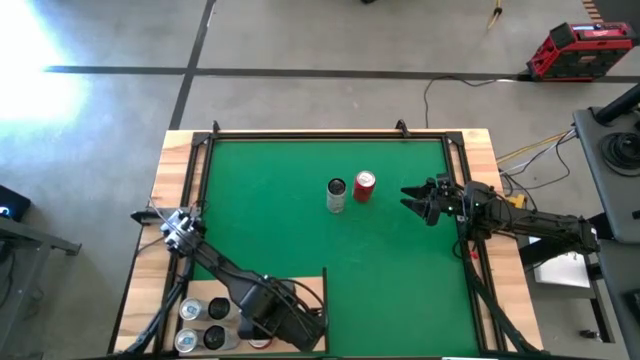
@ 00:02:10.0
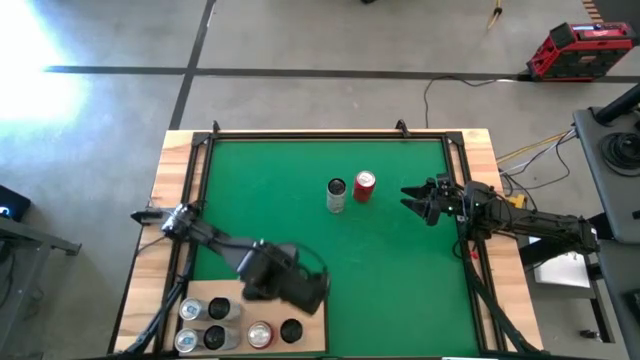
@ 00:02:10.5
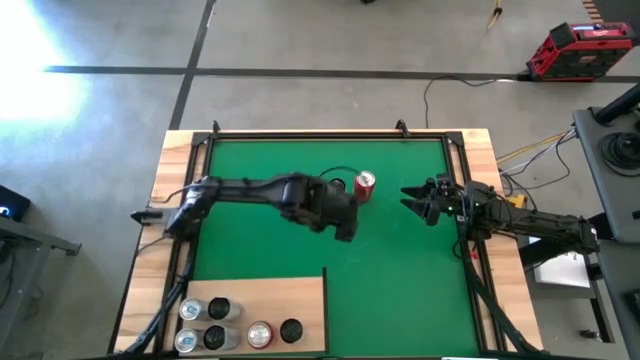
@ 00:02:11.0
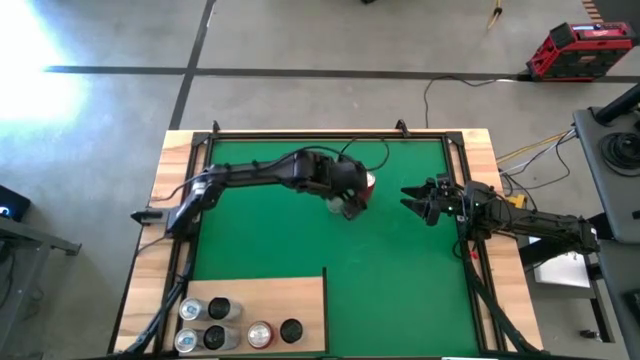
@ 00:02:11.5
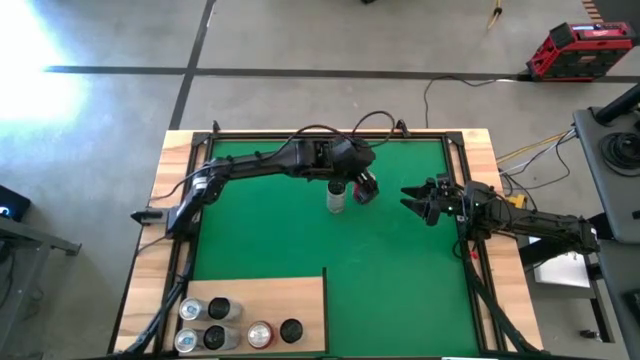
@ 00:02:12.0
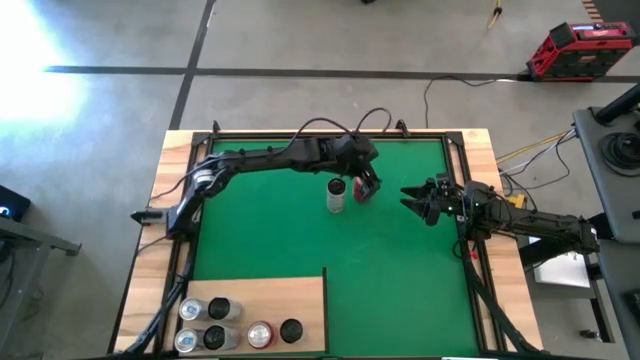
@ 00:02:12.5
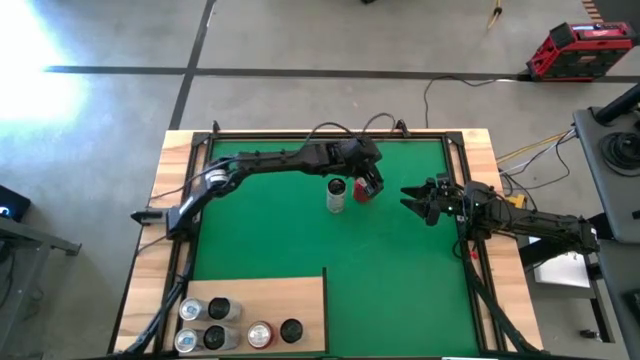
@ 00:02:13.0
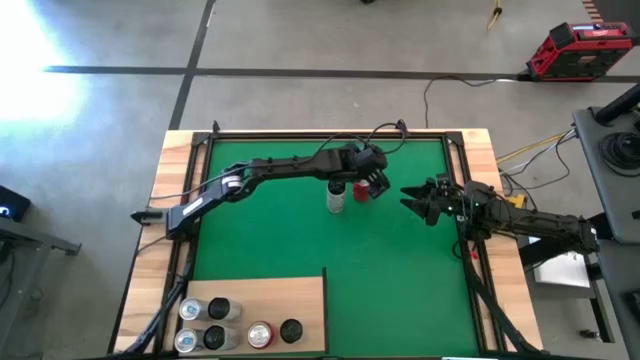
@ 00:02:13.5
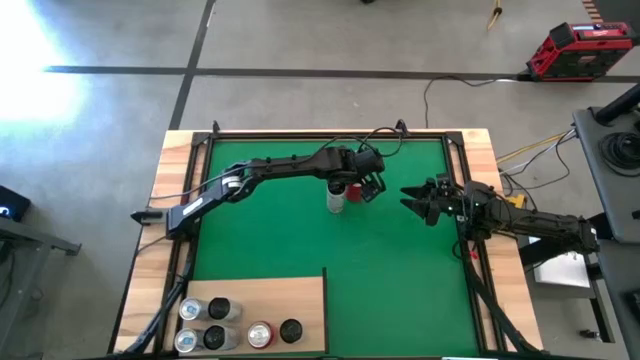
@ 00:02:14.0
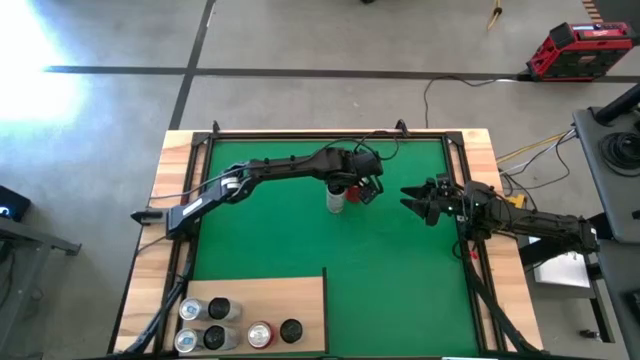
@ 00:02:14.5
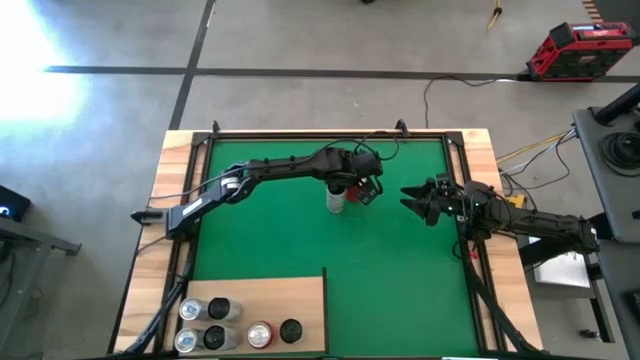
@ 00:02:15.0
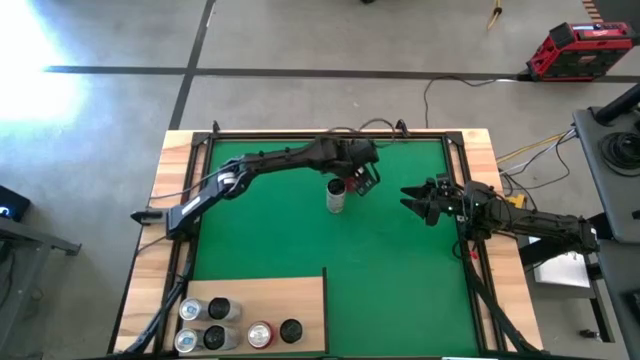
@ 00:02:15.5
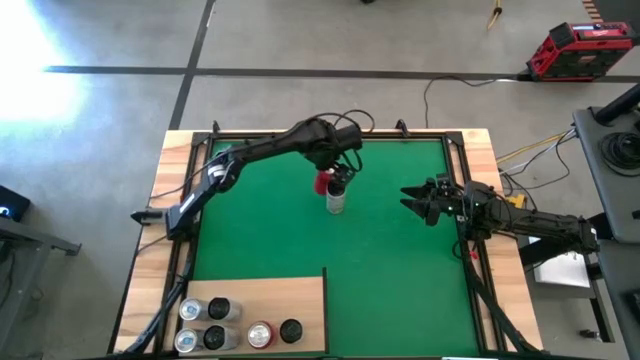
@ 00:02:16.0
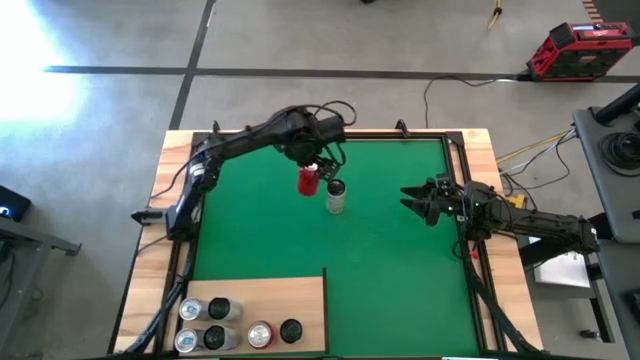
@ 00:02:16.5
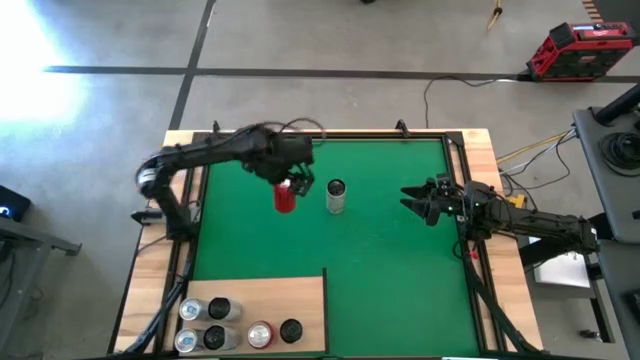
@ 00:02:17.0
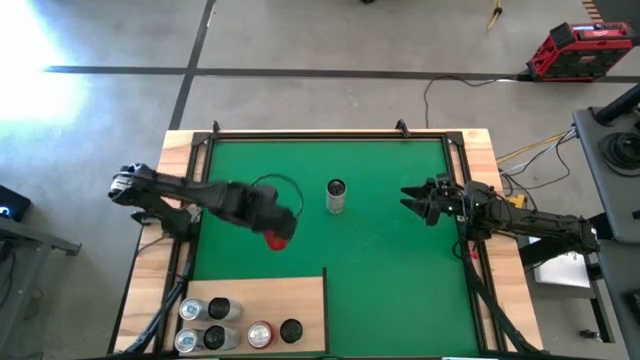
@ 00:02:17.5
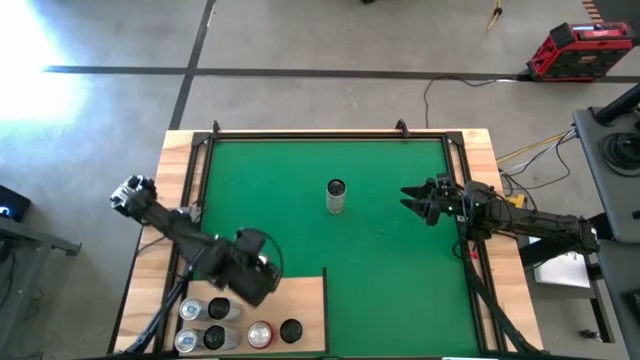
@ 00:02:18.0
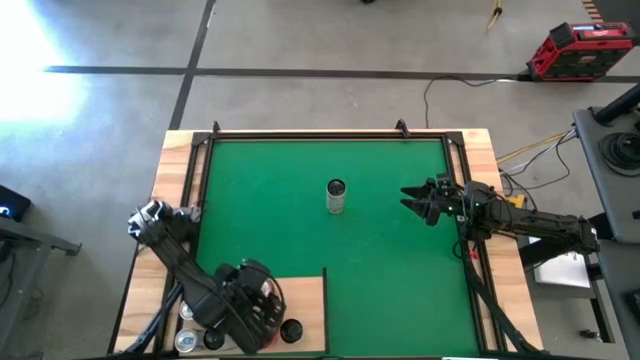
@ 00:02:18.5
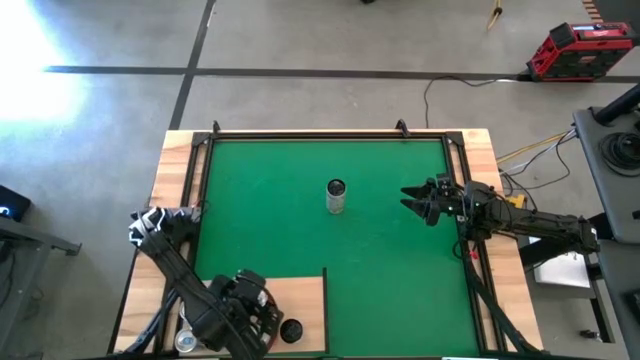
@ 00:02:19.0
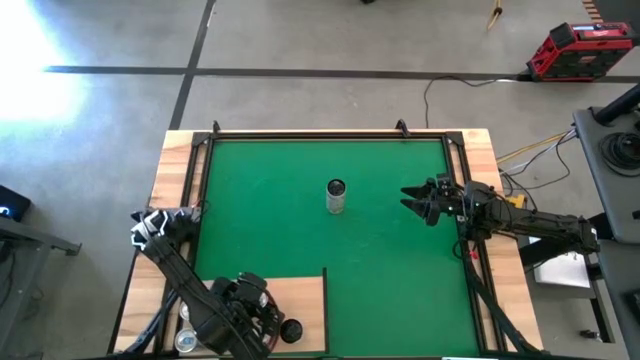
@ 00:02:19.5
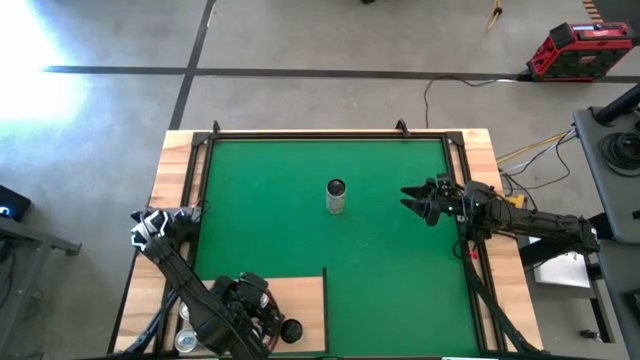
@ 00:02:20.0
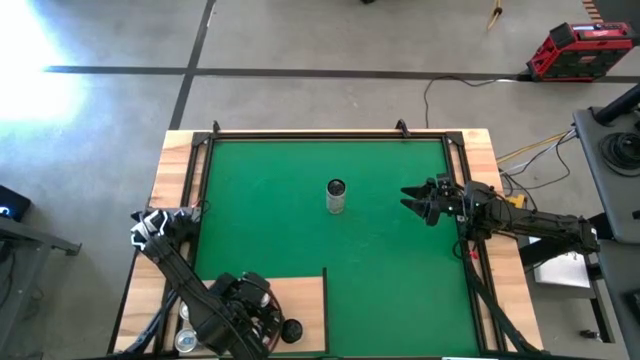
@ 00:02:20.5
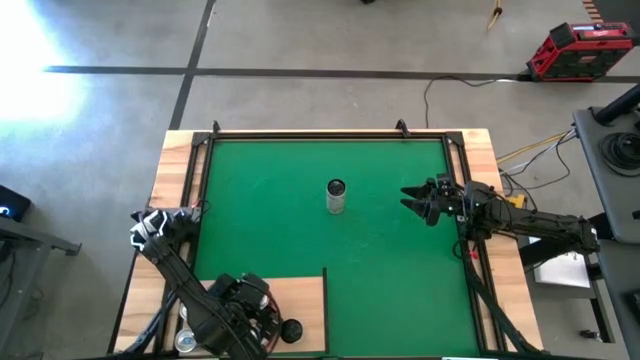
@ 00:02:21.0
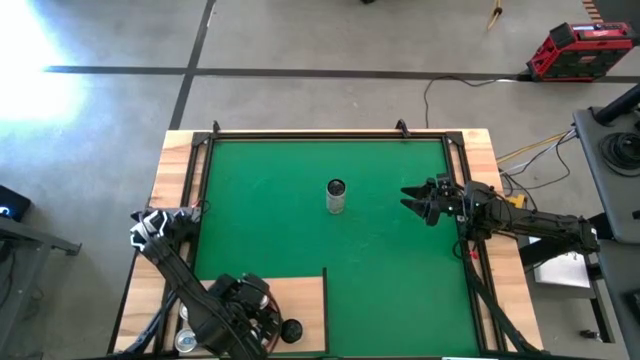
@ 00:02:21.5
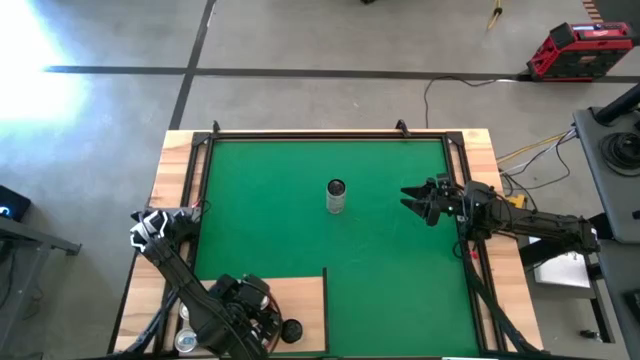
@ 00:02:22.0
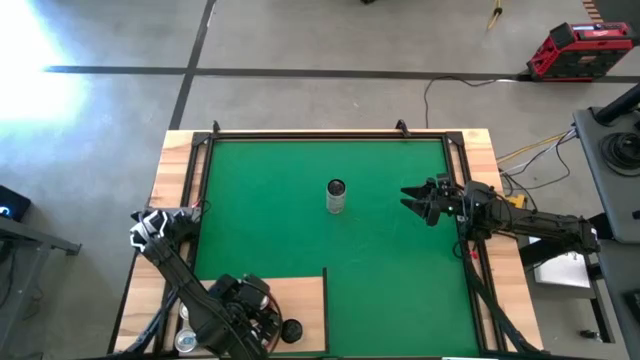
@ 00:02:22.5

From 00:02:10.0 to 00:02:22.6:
Task: Place canned beverage on shelf
Put the red soda can on the shelf align with other the red soda can

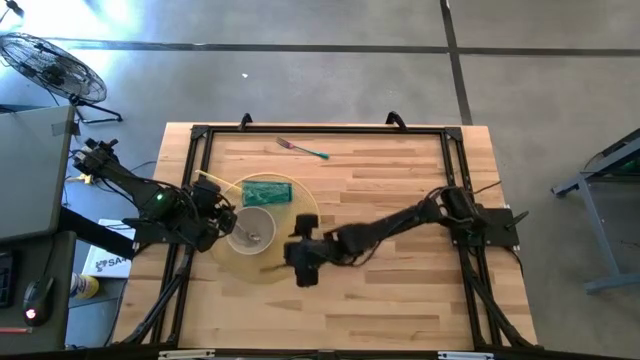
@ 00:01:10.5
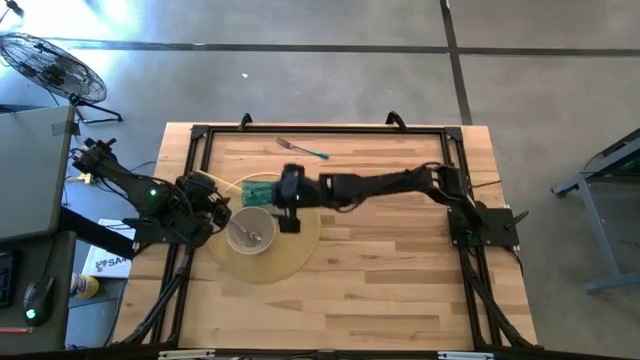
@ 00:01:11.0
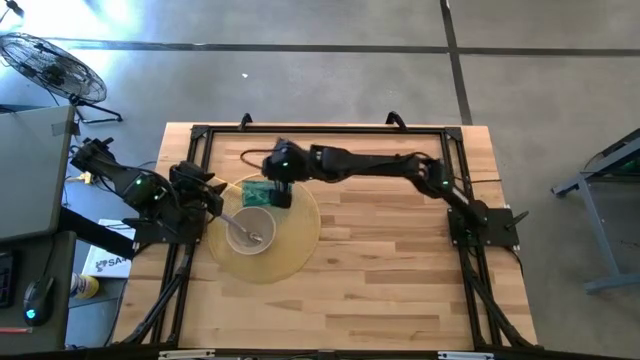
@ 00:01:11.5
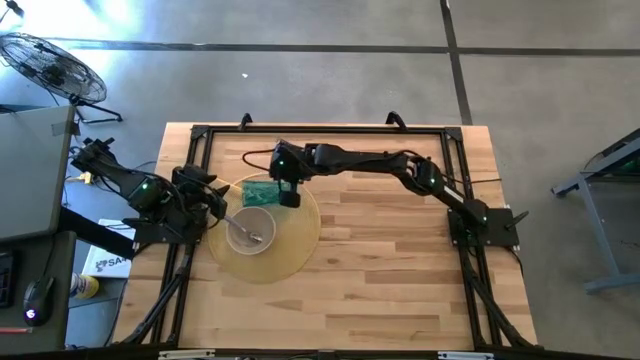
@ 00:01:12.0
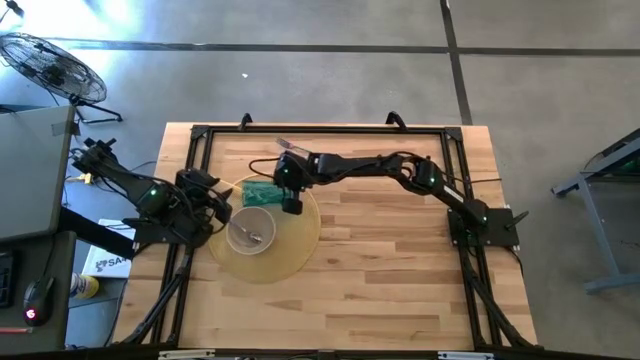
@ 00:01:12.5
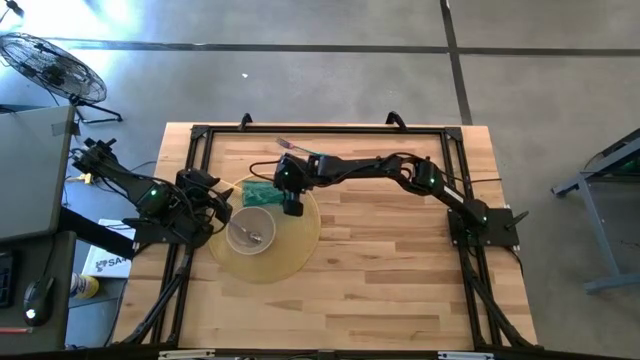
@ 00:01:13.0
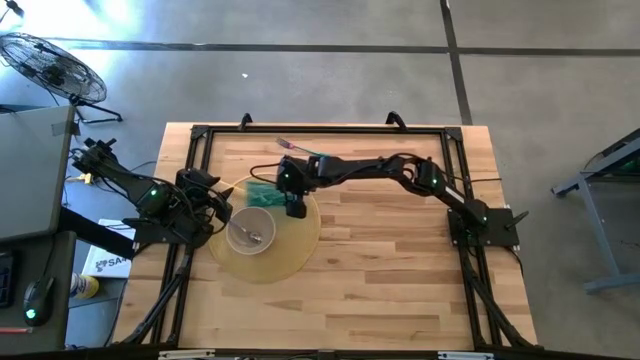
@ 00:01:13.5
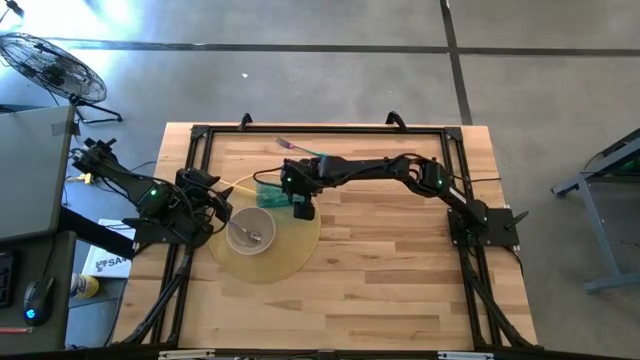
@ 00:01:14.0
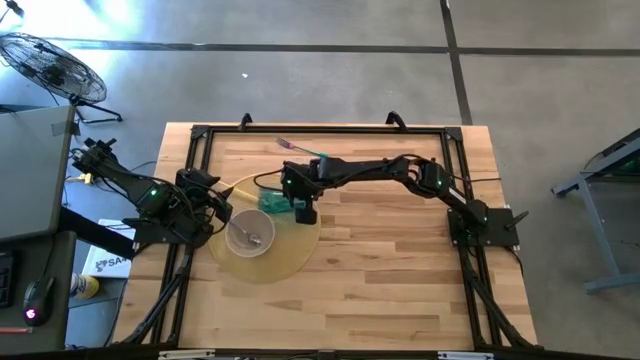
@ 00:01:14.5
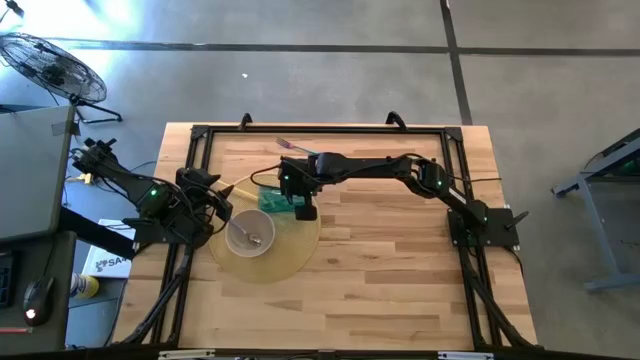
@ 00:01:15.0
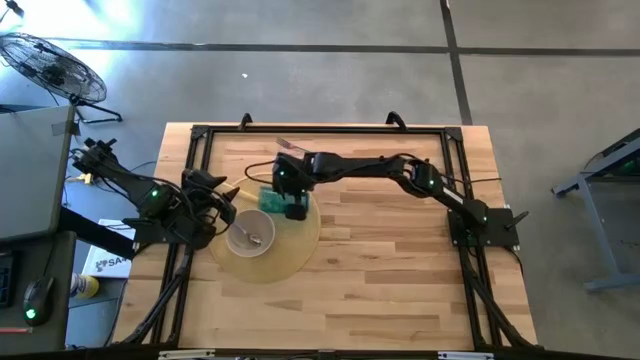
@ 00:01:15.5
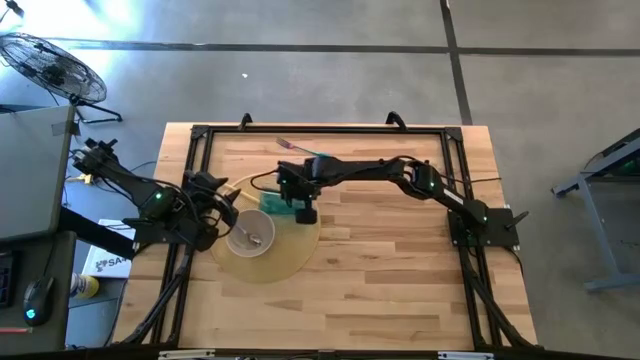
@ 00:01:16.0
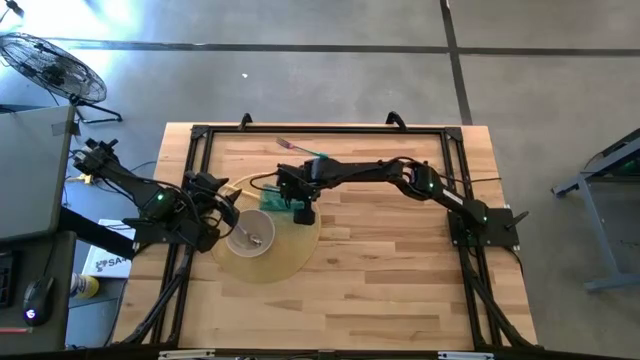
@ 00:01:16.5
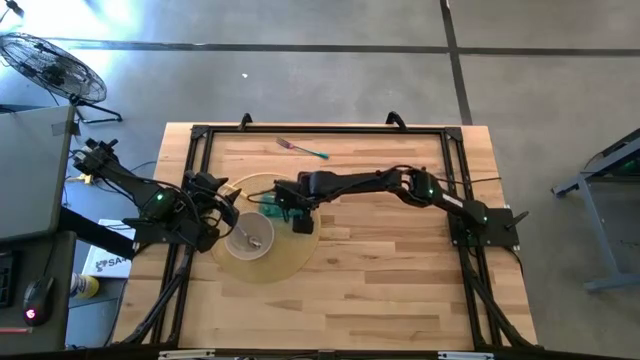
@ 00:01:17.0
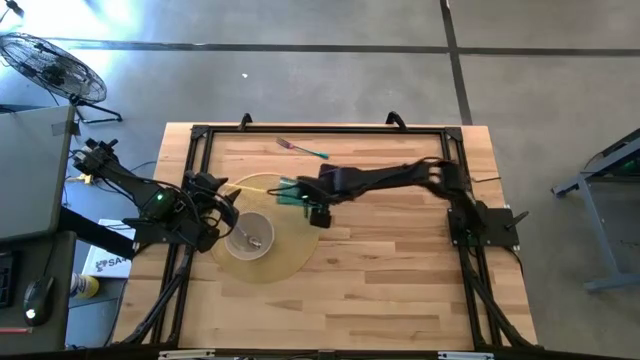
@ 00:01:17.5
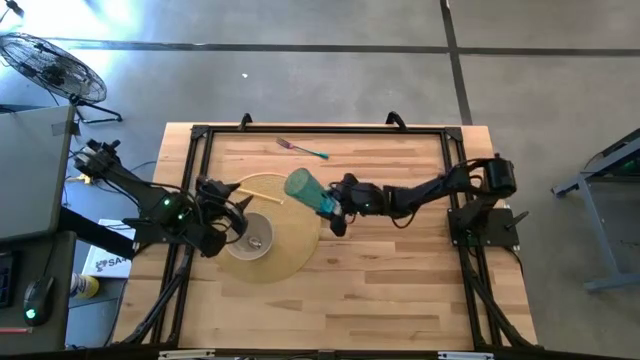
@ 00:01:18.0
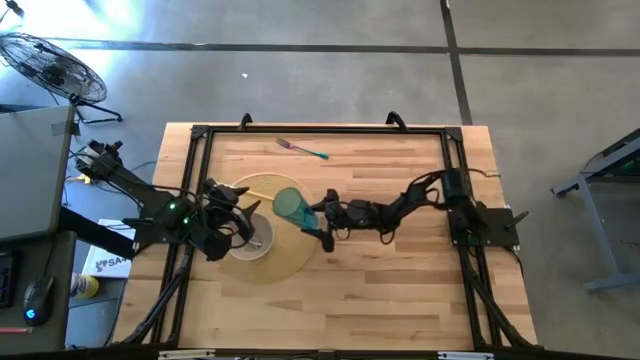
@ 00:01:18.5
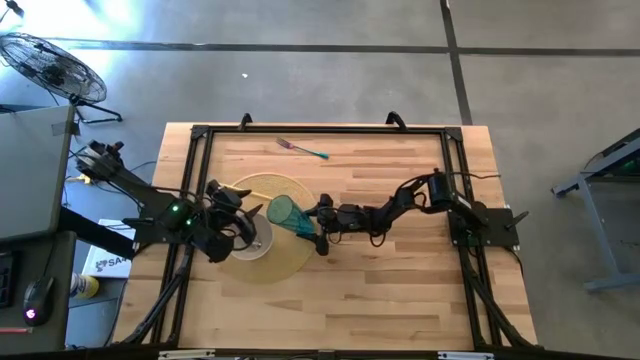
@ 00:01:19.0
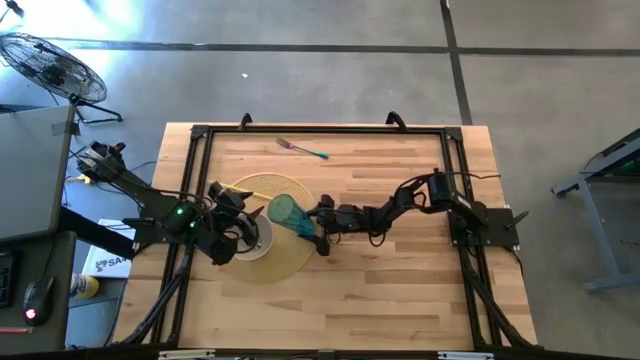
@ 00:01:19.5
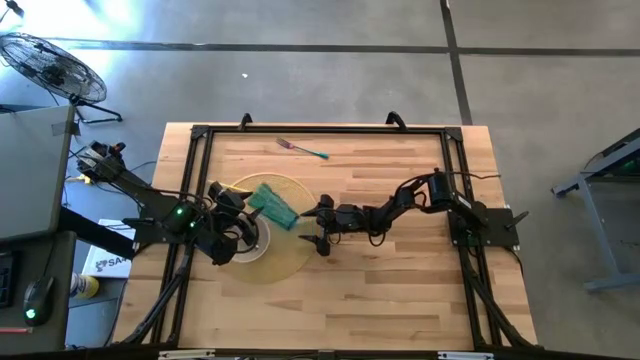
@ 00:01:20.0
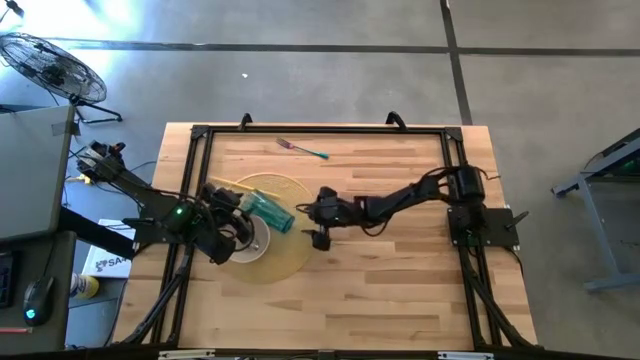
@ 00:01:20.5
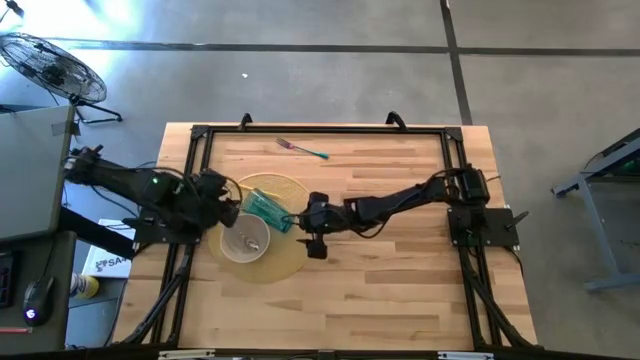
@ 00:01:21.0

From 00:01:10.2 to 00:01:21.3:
Task: Pick & Place Utensil
Adjust the blue cup on the brown mat
